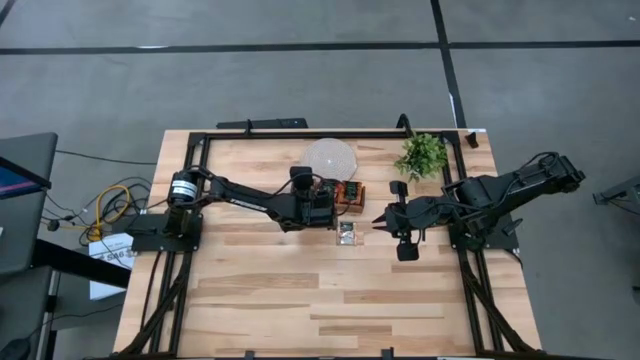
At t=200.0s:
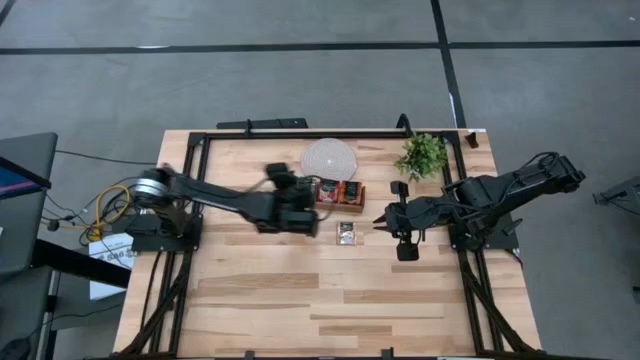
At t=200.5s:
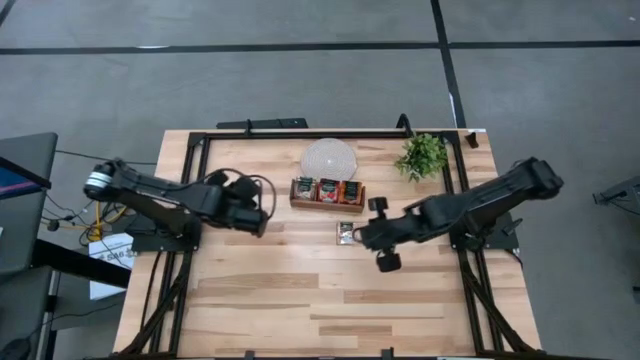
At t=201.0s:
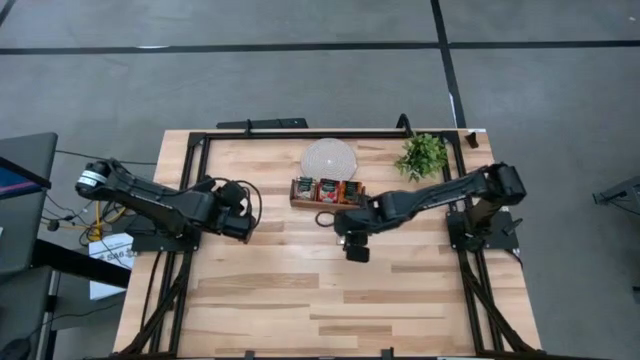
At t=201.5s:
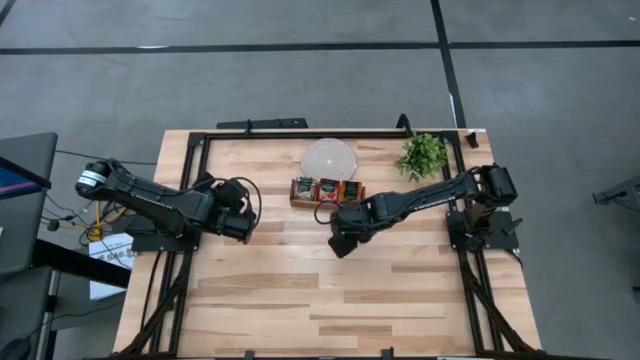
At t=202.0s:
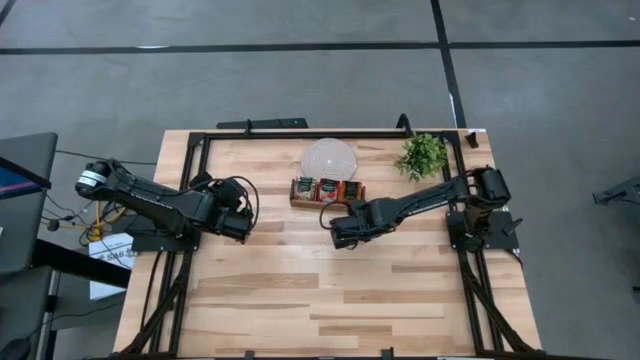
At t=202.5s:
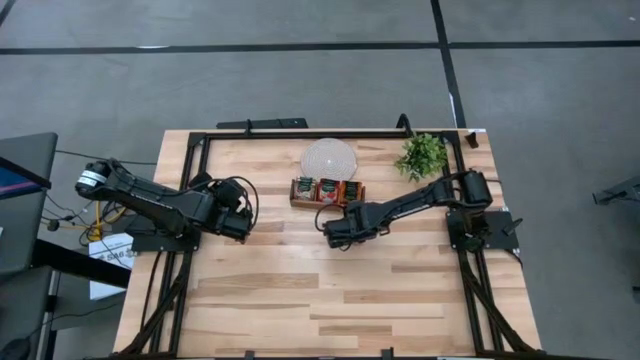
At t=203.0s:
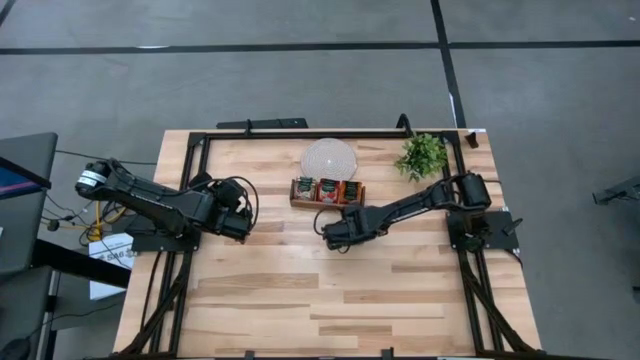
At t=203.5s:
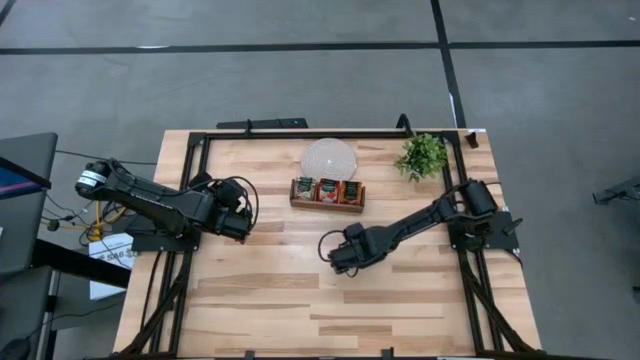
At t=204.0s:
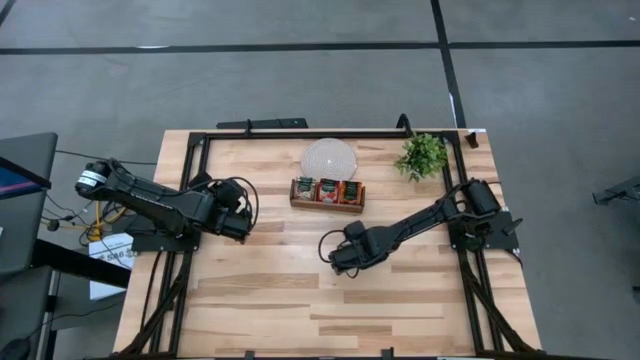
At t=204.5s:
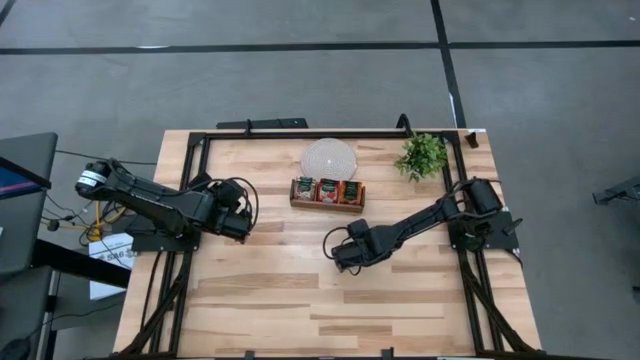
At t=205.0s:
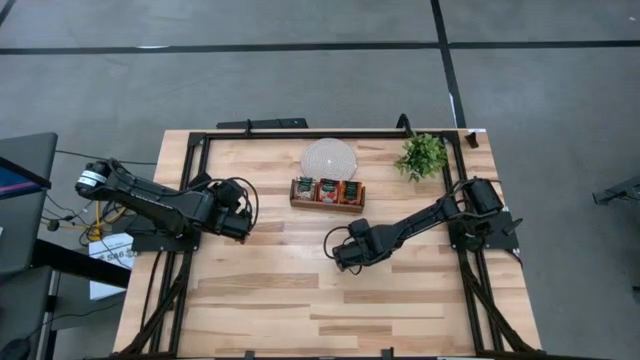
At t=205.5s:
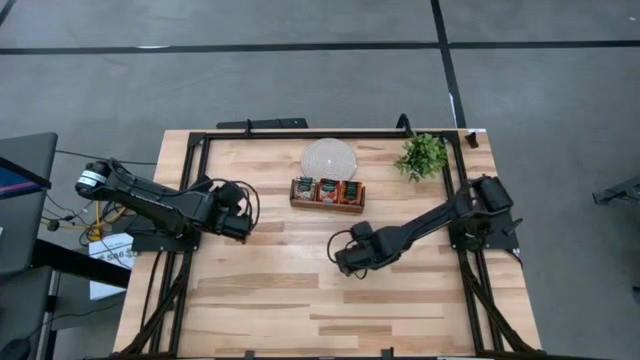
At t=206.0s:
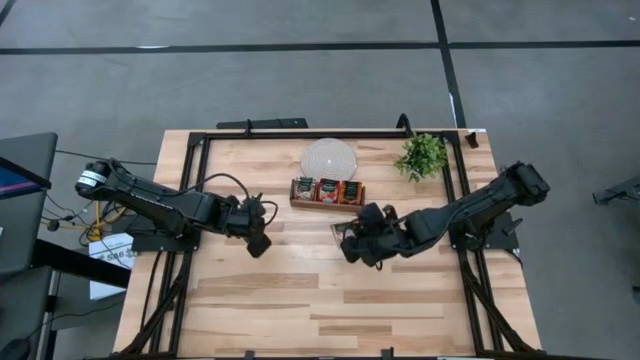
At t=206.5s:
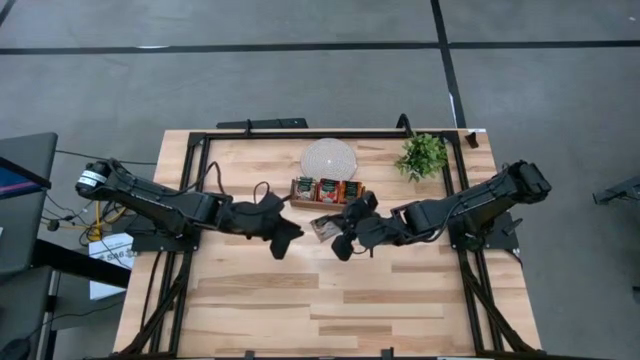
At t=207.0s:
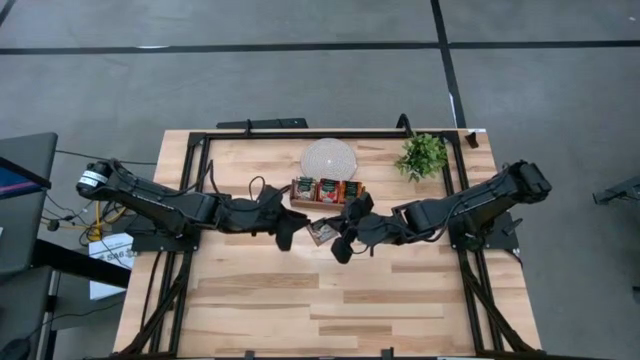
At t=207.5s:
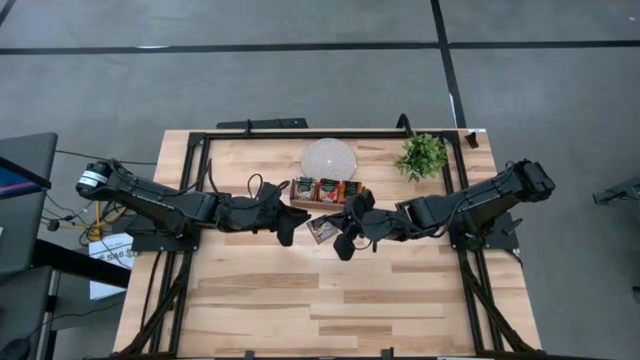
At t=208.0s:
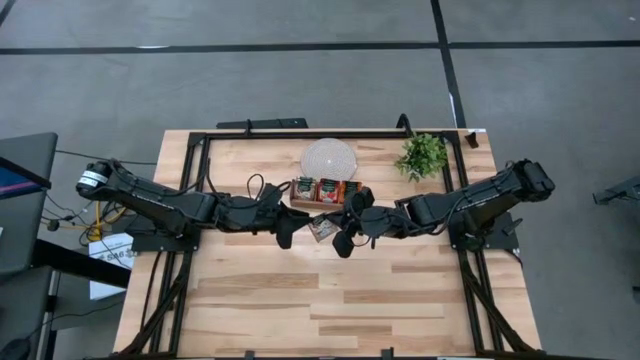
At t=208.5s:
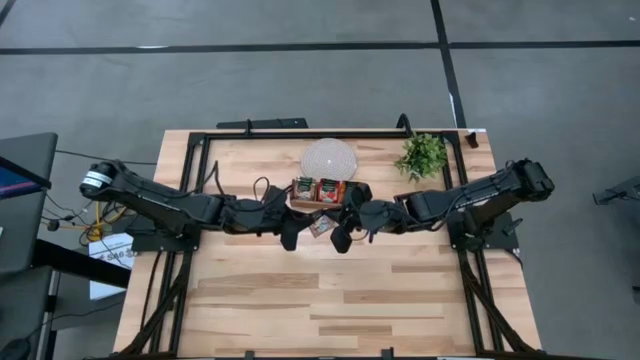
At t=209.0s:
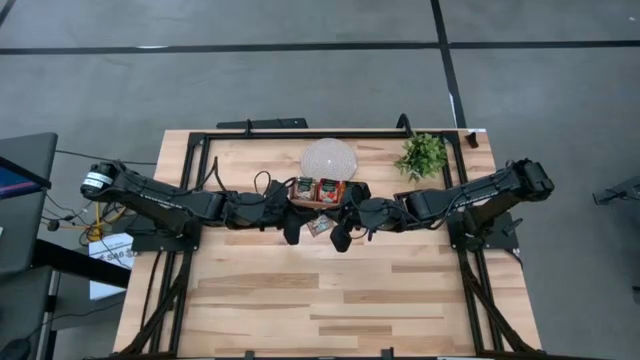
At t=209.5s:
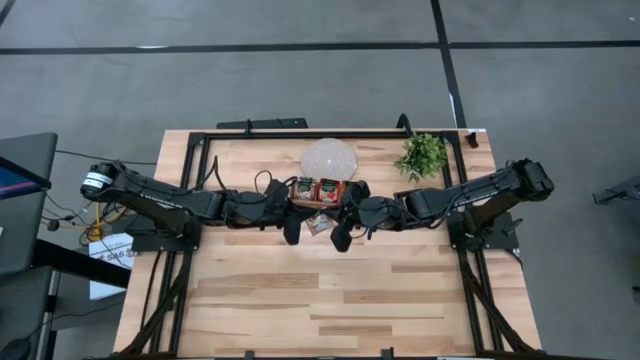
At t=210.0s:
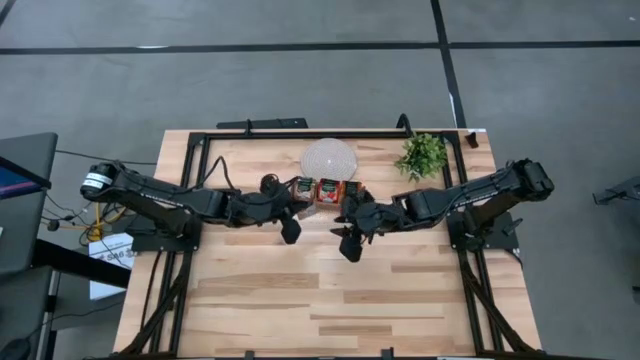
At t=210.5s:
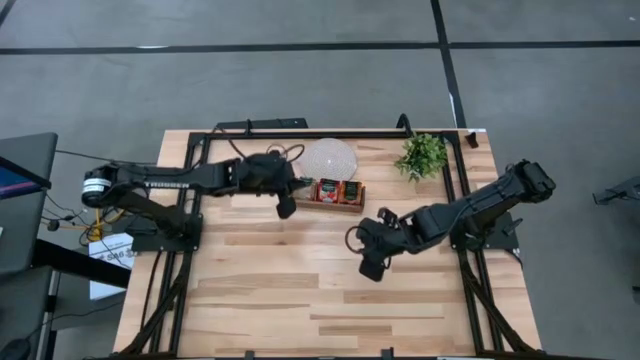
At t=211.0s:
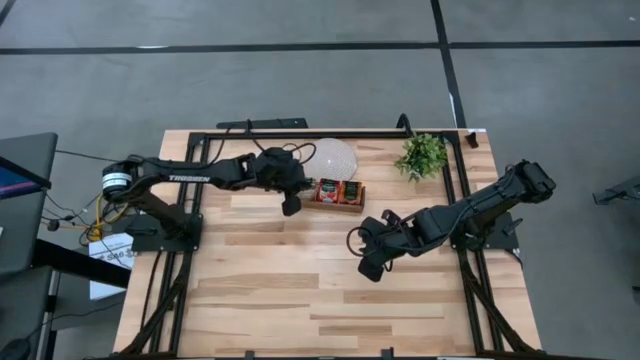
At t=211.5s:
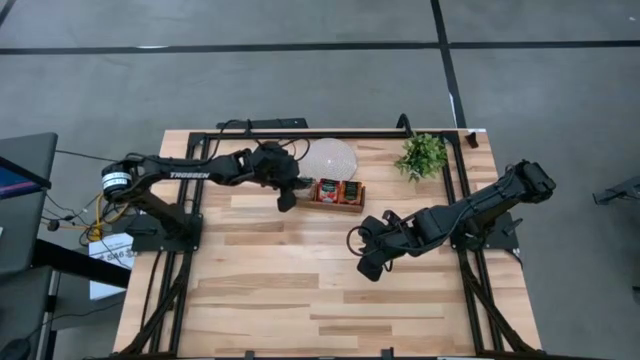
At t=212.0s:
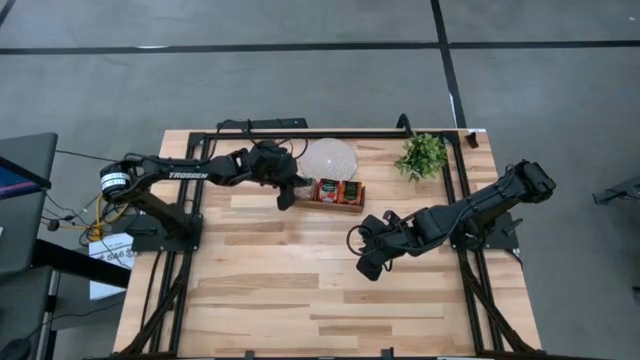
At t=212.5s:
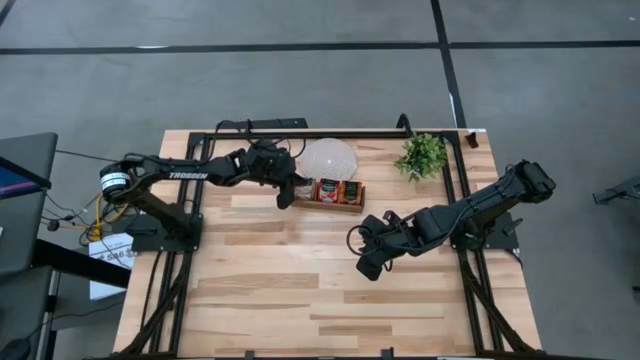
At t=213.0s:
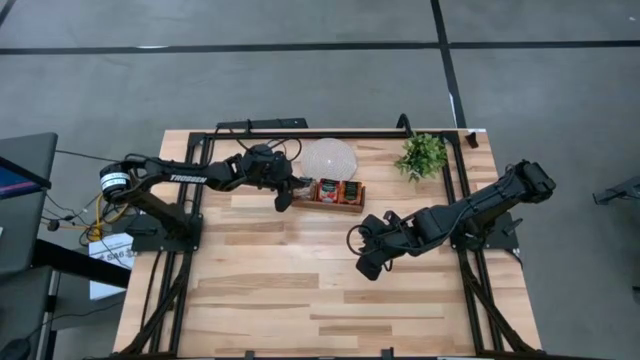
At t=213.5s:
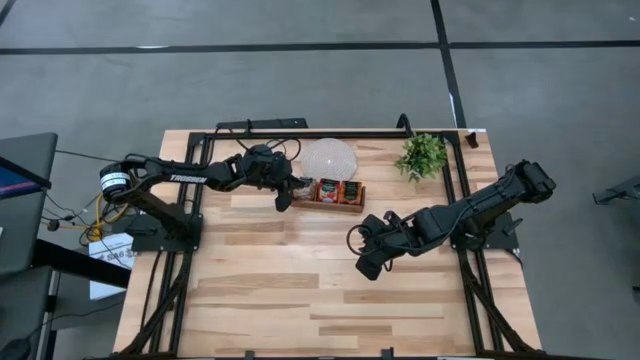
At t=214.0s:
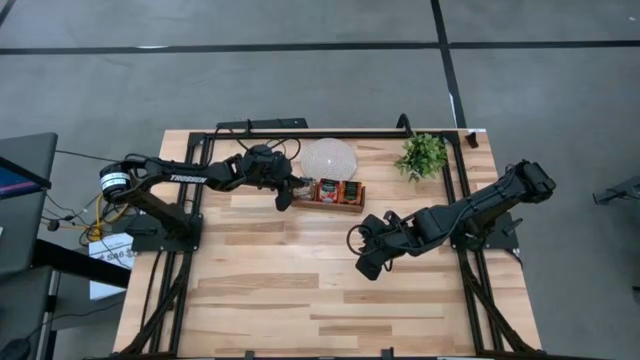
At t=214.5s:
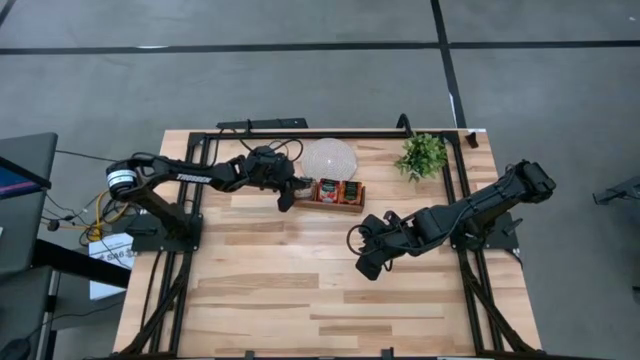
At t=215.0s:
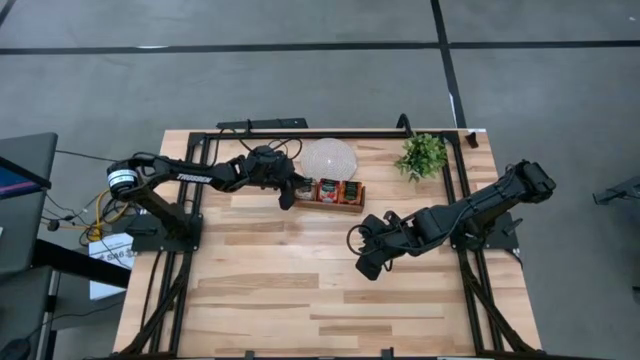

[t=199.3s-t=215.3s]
Task: Pick & Place Tea
Put the brown tea bag into the left compartment of the wooden organizer

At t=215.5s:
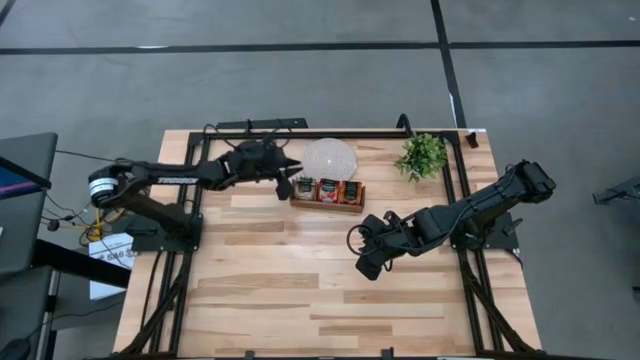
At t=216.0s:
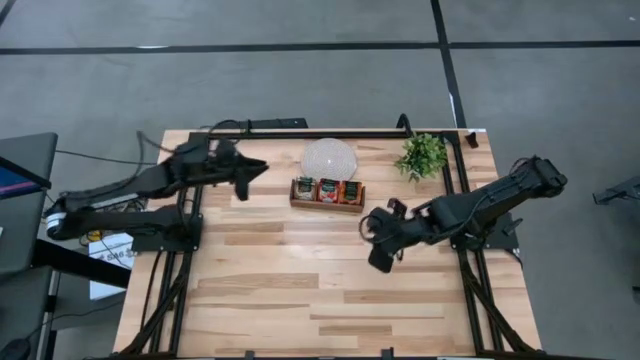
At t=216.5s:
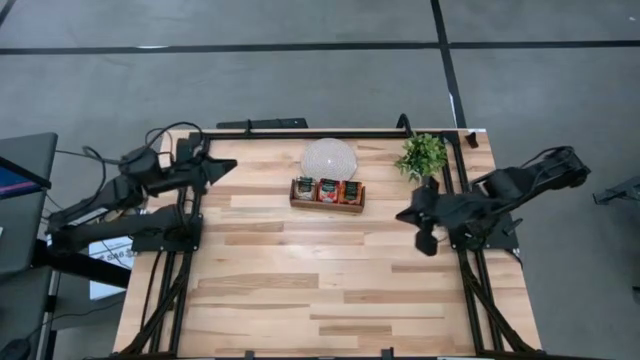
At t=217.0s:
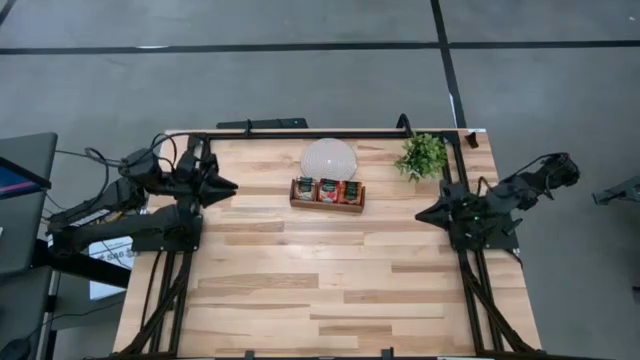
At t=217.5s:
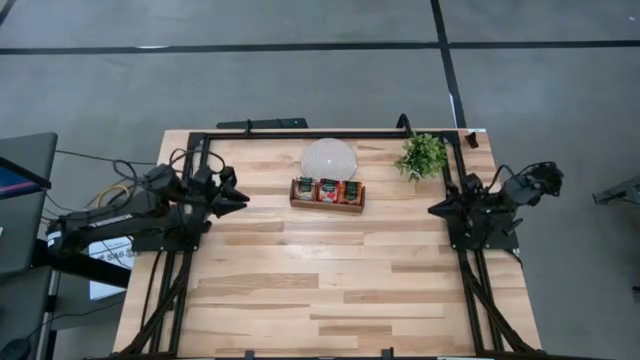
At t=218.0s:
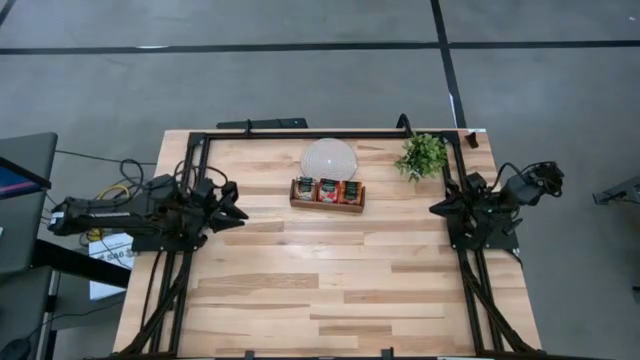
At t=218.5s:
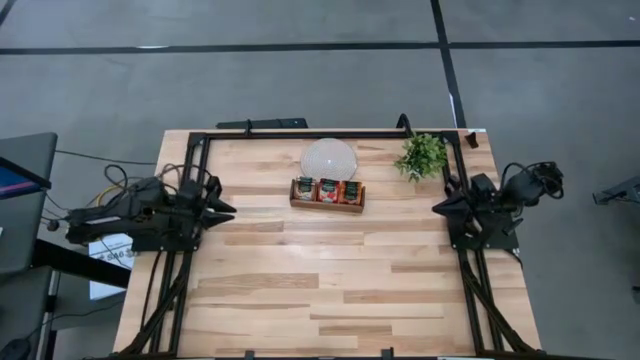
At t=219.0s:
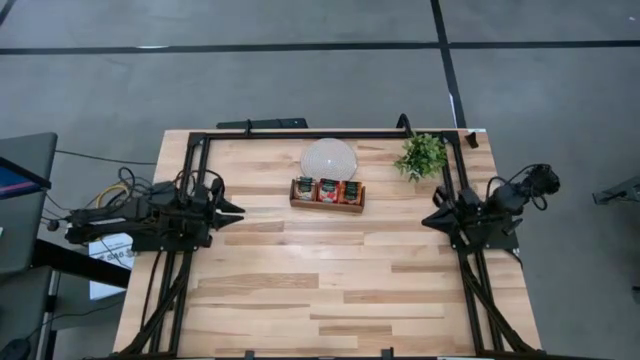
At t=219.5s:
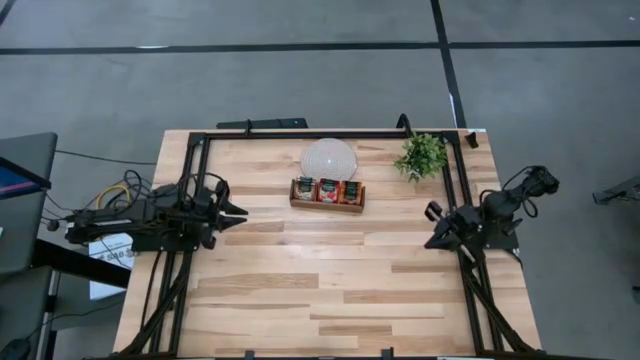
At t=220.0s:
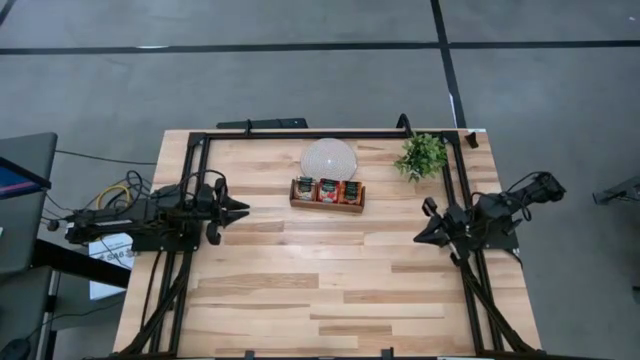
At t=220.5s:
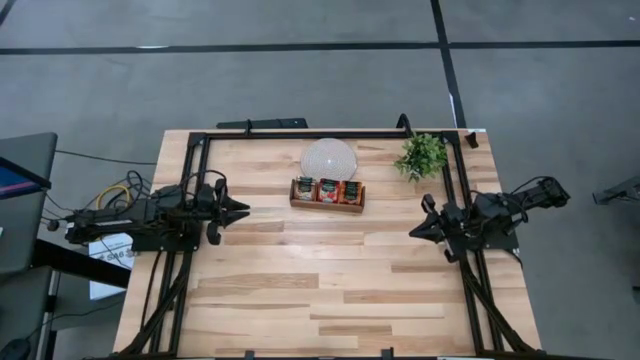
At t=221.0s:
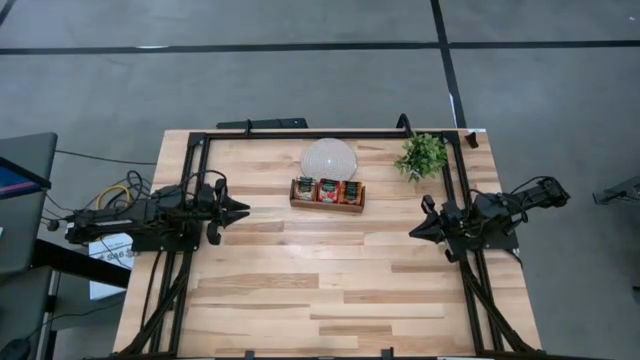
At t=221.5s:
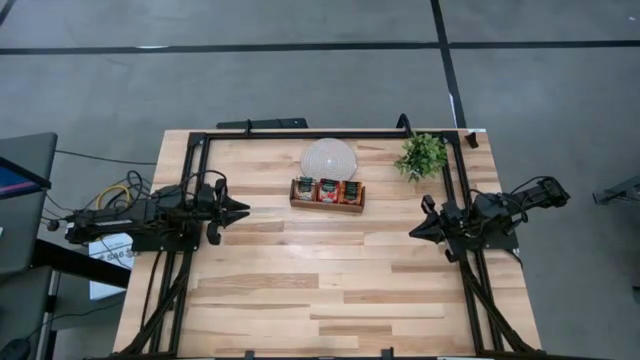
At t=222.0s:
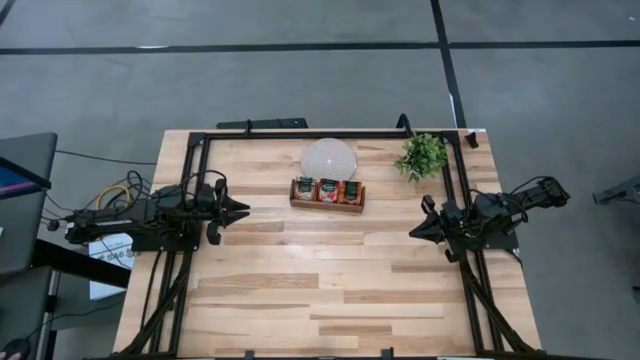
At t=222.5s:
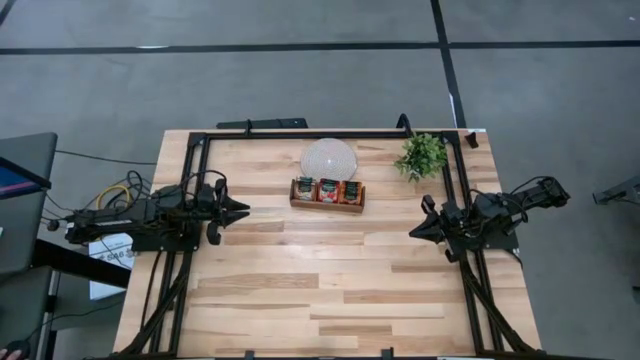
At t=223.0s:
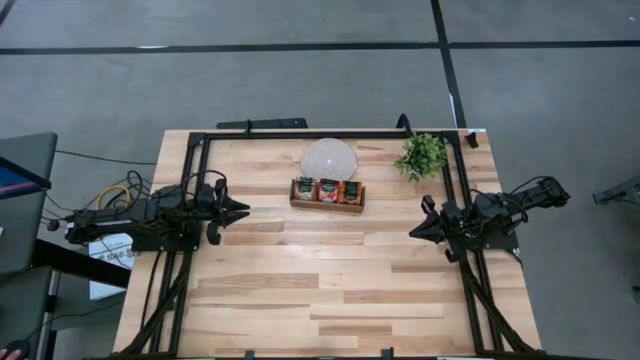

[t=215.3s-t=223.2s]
Return to Home Position
